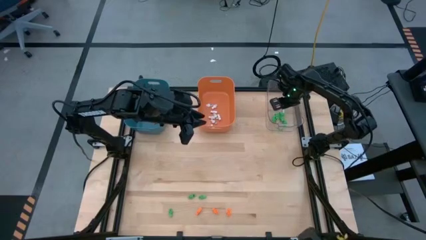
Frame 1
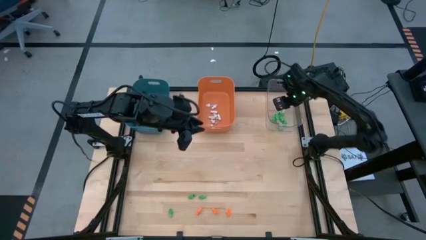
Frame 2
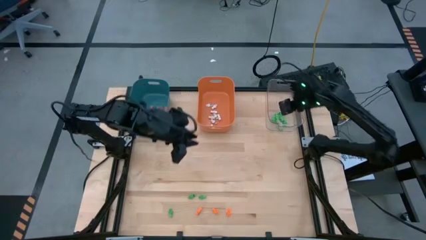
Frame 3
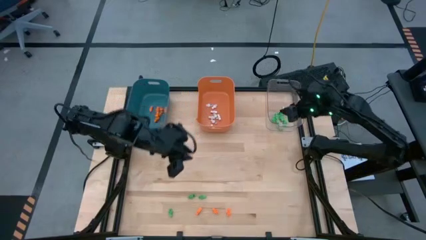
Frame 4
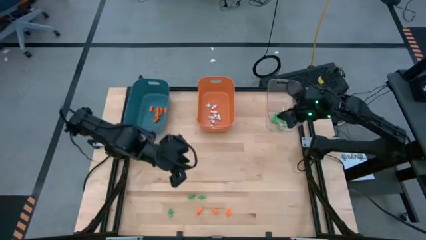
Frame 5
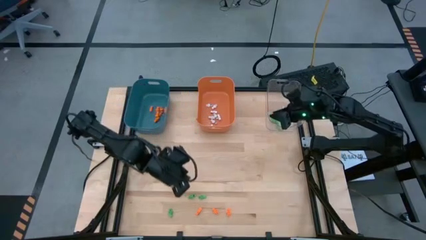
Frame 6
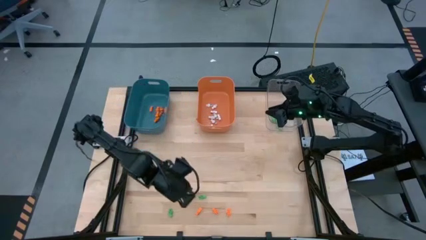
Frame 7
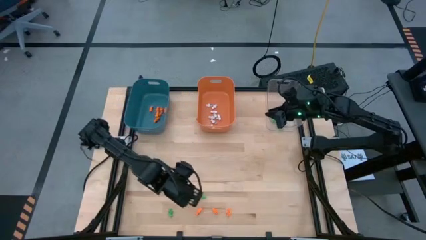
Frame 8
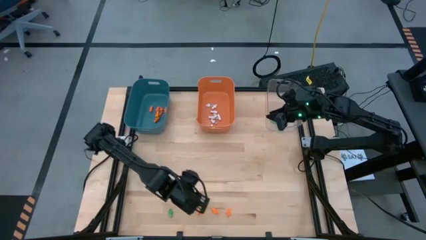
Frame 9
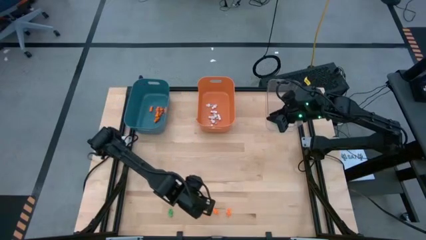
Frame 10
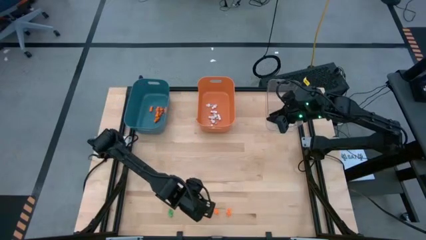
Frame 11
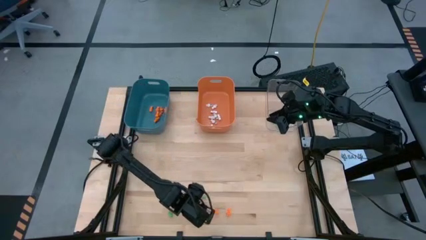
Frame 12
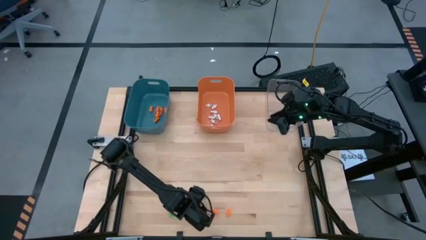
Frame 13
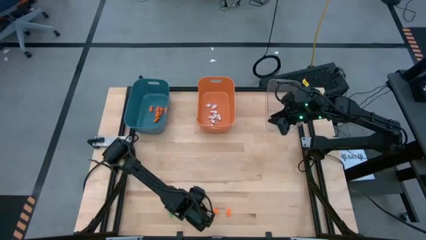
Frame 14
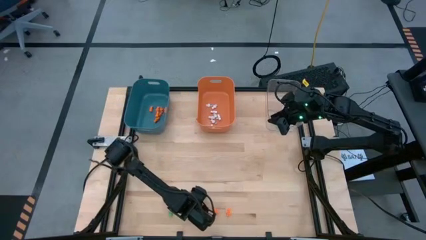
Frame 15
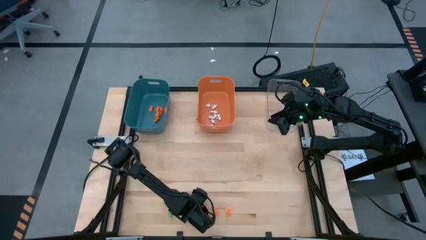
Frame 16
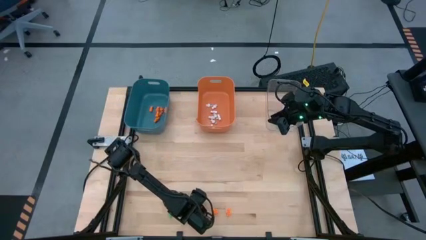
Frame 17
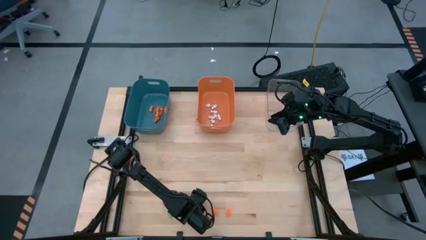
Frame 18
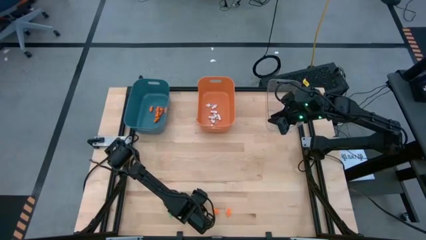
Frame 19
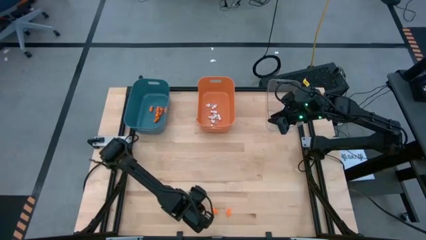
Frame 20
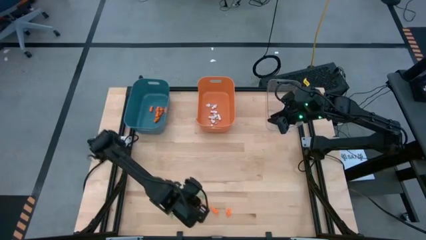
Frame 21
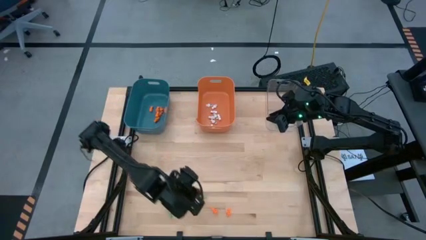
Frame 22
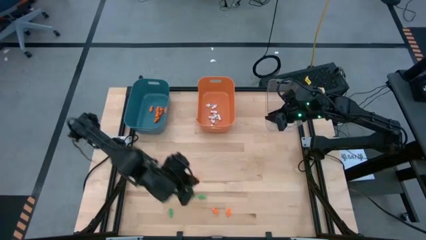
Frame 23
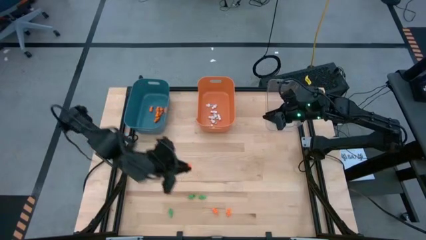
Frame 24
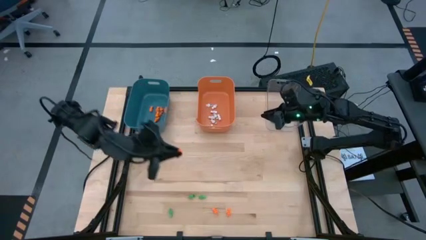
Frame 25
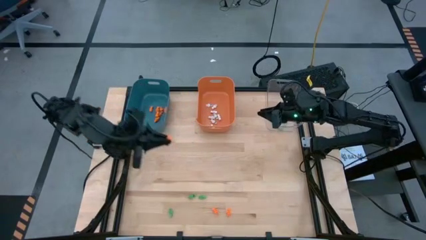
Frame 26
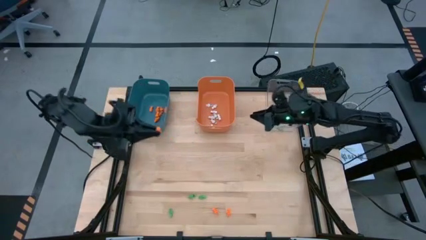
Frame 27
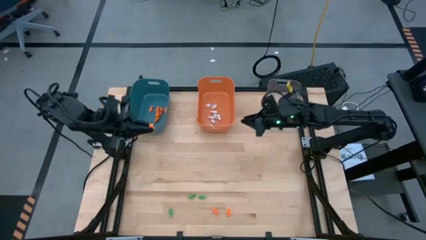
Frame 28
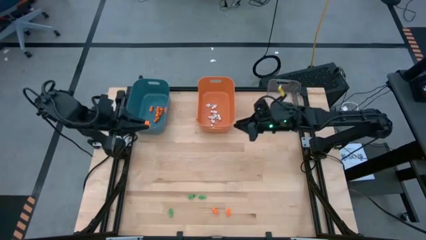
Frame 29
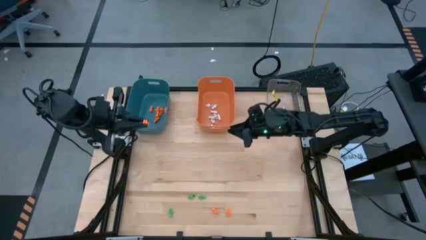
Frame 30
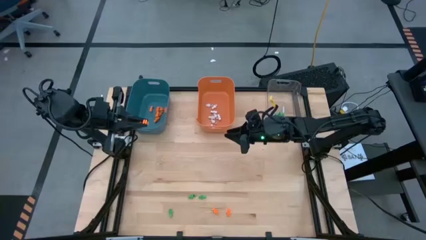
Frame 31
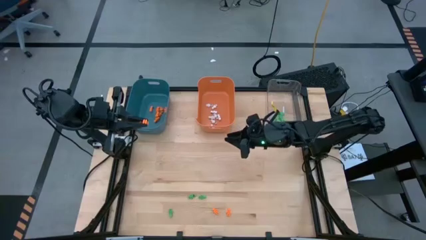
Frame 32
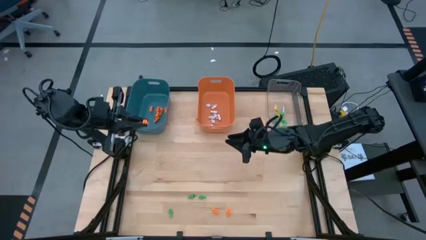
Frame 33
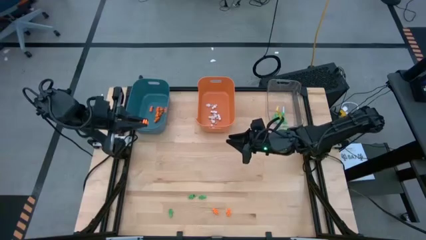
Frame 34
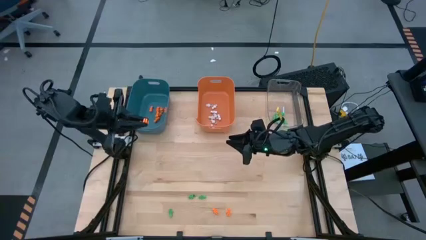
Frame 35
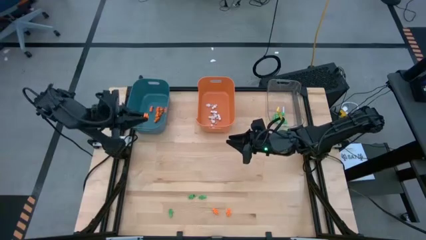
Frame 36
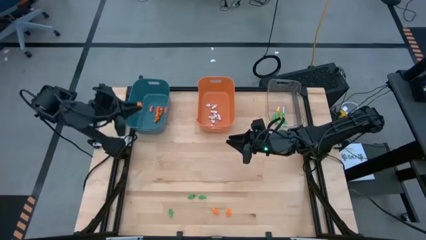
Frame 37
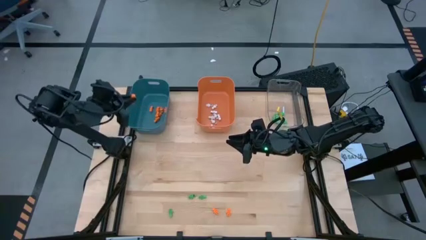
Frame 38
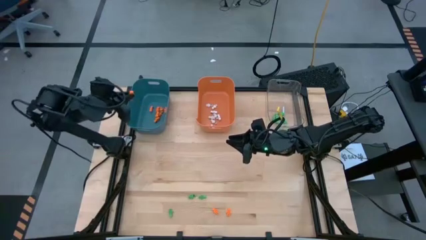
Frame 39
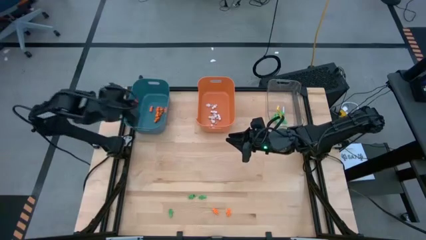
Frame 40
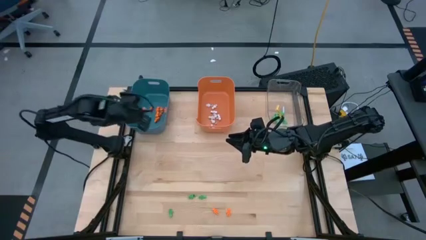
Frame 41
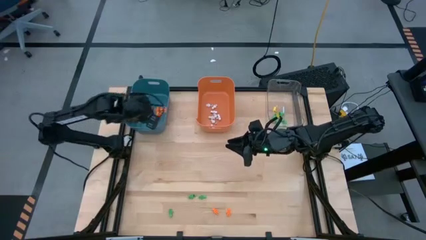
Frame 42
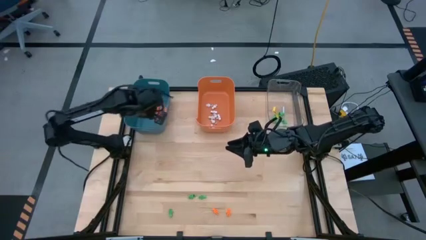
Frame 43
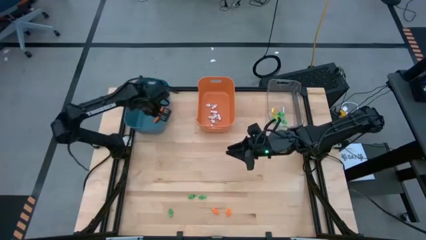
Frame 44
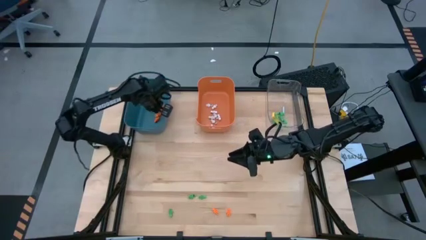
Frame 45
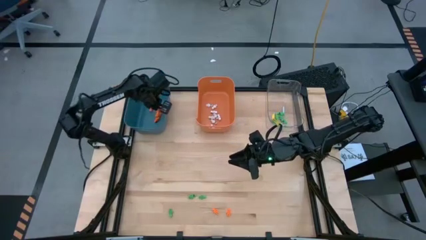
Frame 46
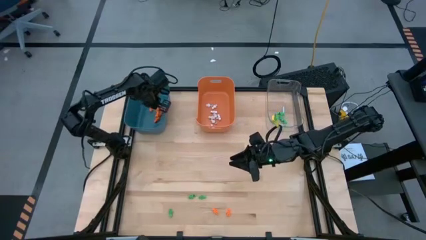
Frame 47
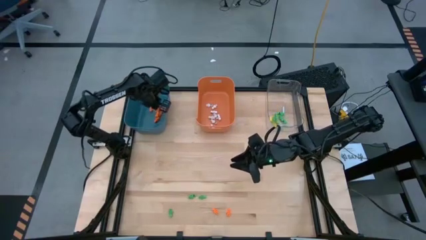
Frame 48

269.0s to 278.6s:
Task: Sort Halloween decoration
Put the orange skeleton toy into the blue bin
